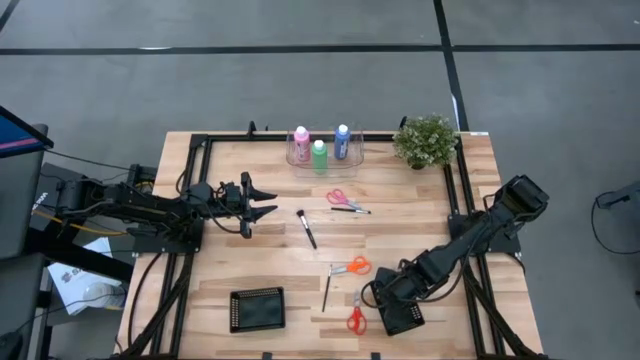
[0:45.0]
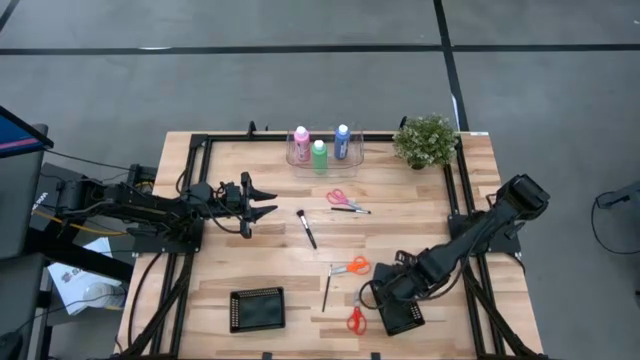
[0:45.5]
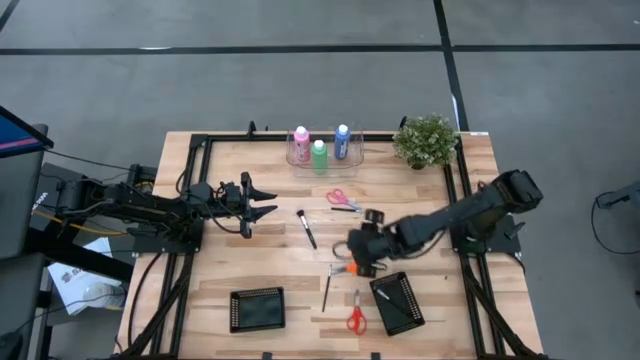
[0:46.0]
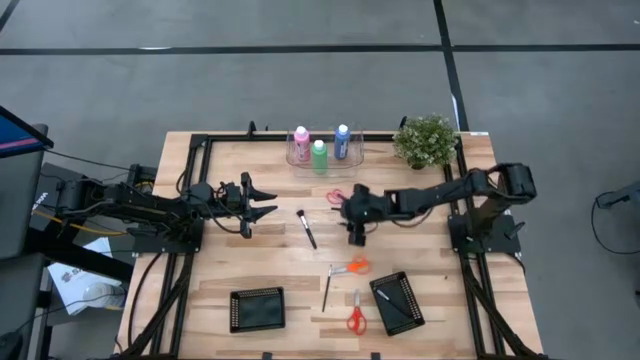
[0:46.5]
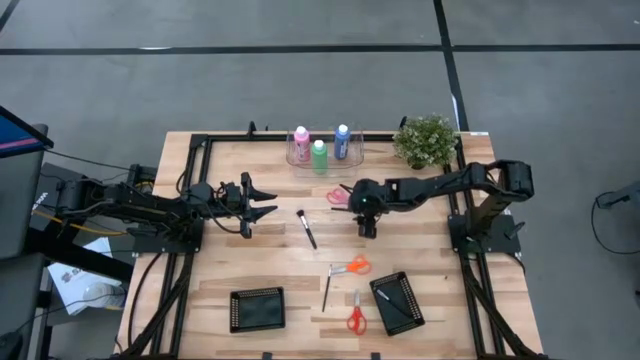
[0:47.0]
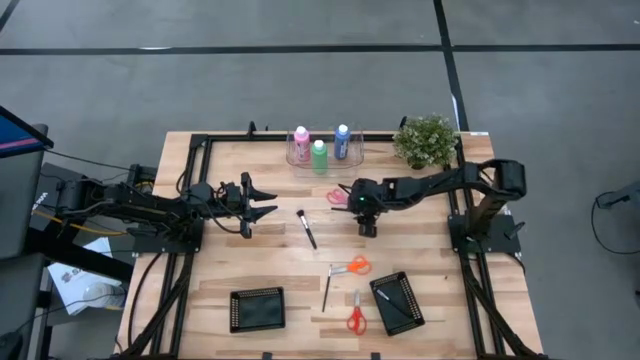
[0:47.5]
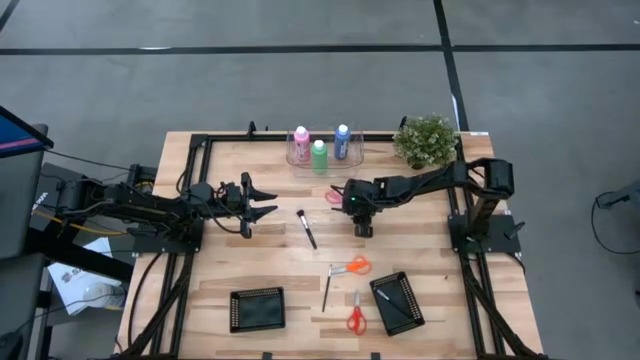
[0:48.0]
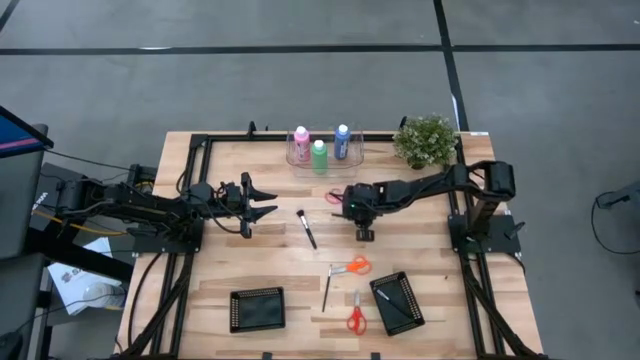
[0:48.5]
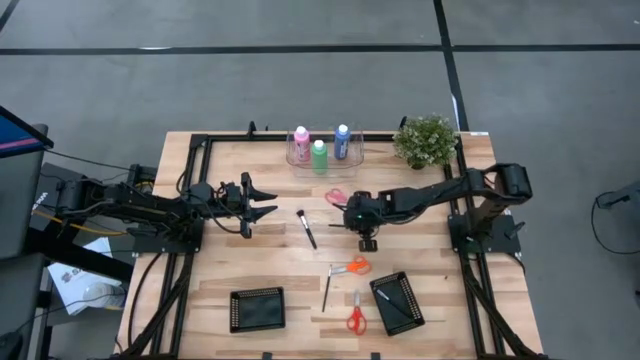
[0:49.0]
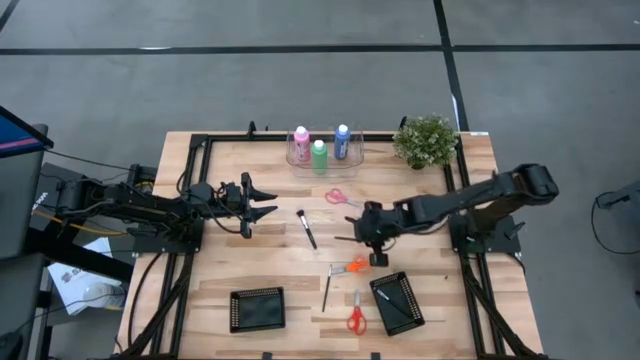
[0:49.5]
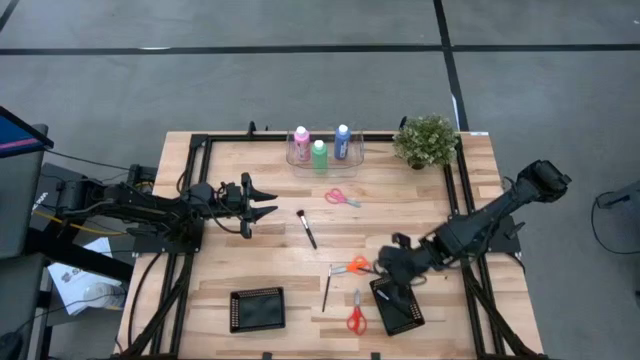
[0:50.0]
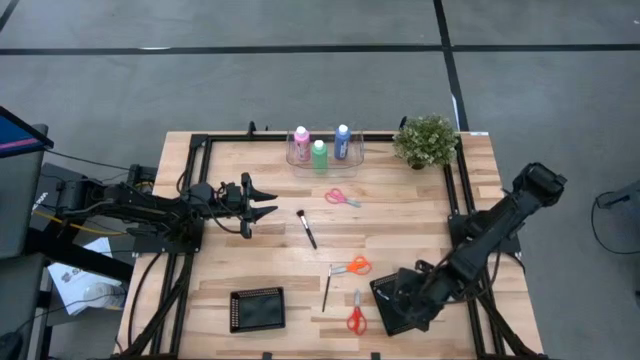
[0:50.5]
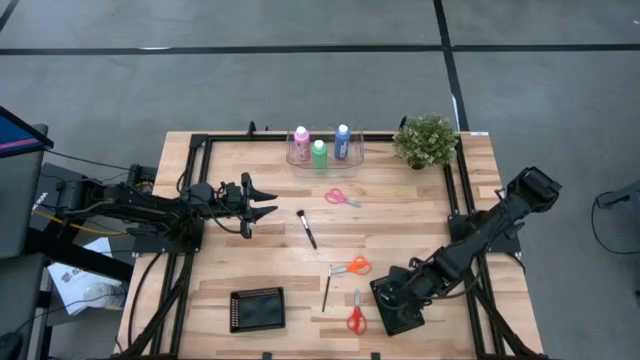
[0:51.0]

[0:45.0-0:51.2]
Task: Pick & Place Paint Supplies
Put the black paint brush into the right black bin

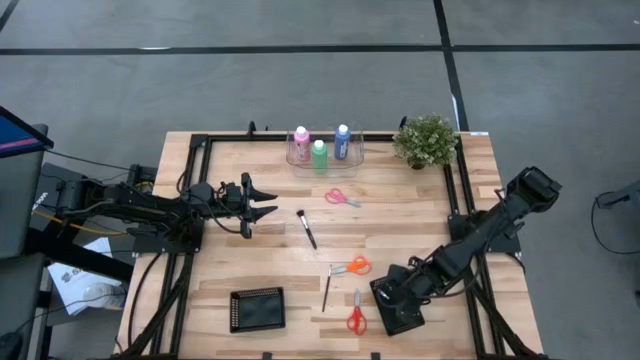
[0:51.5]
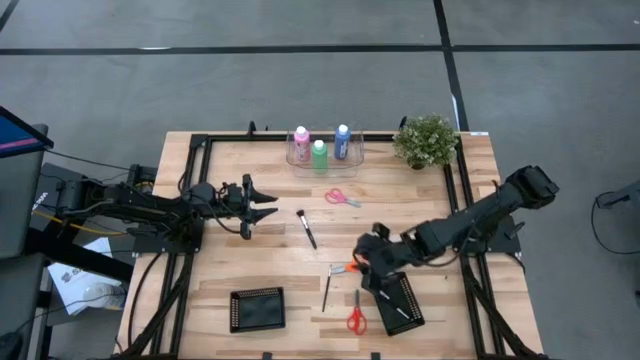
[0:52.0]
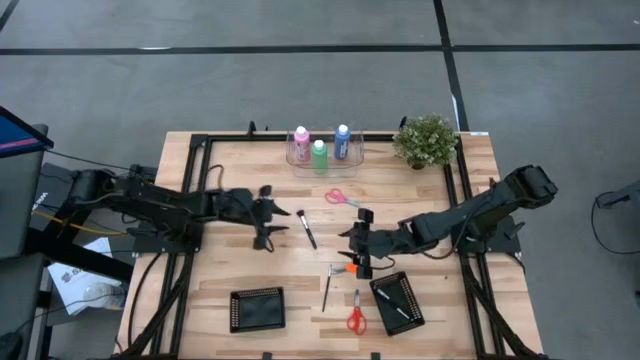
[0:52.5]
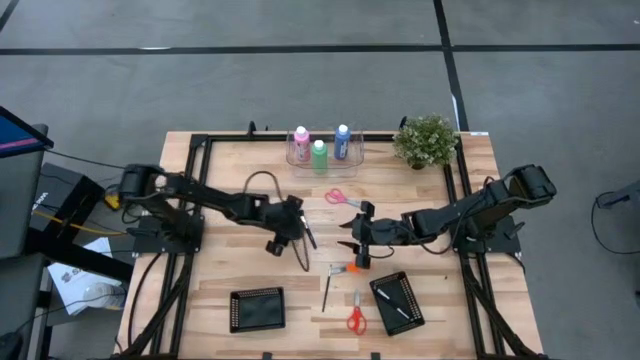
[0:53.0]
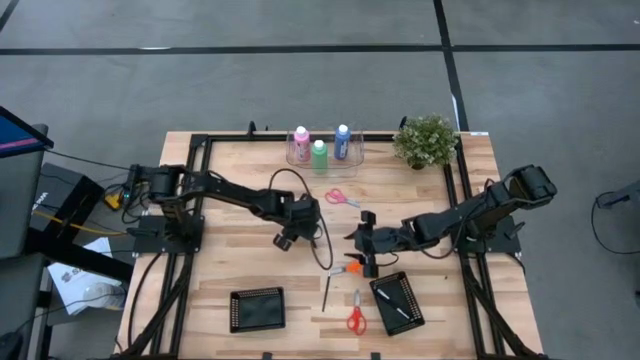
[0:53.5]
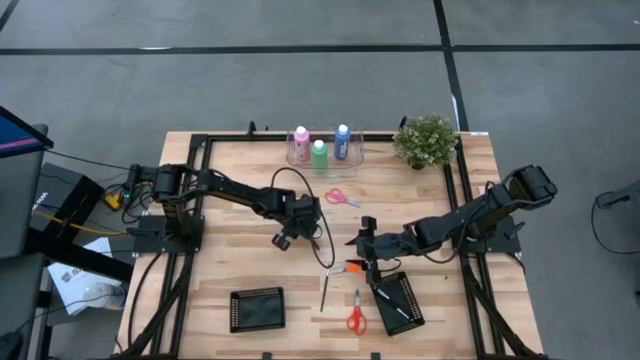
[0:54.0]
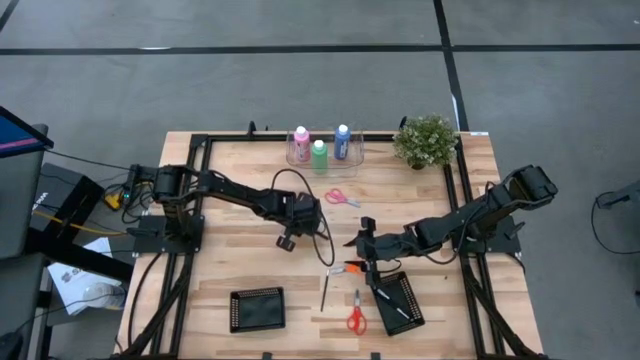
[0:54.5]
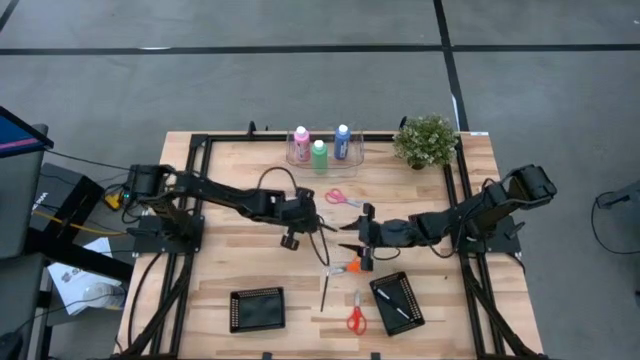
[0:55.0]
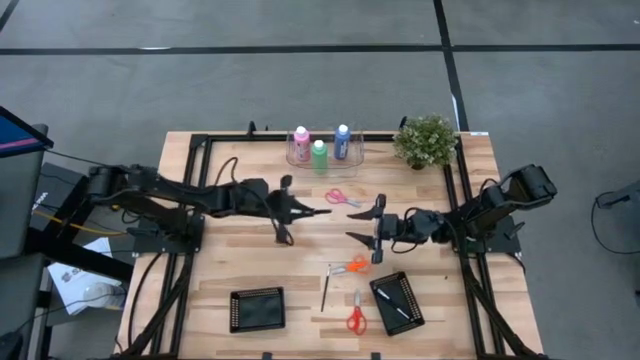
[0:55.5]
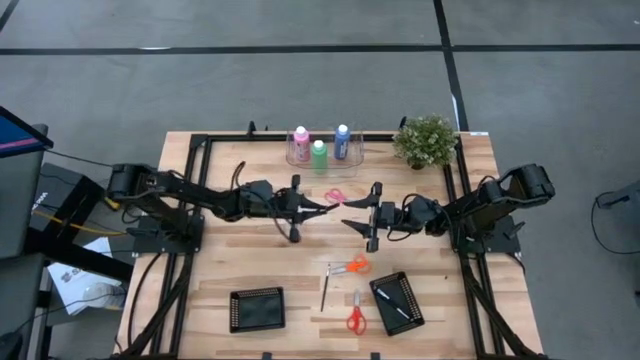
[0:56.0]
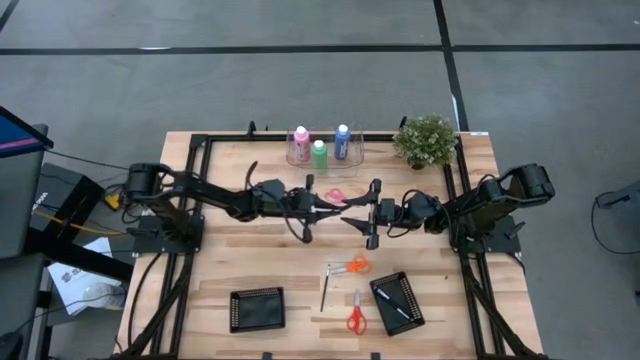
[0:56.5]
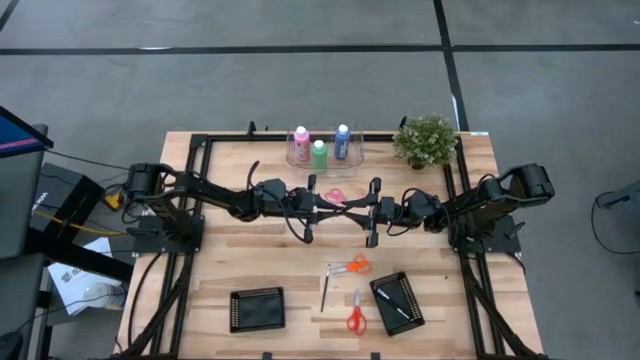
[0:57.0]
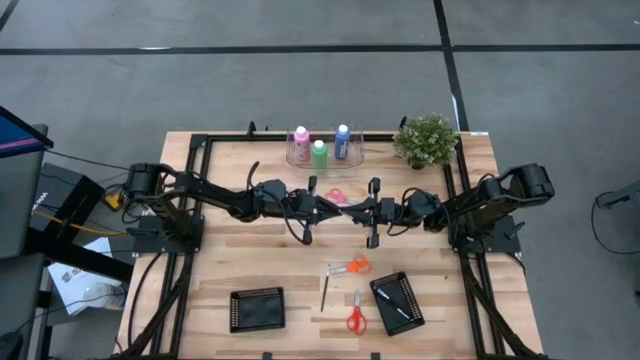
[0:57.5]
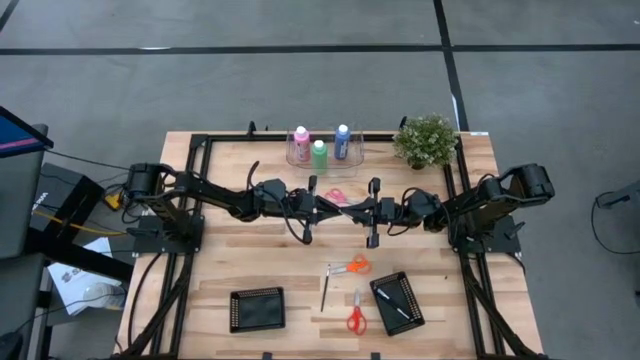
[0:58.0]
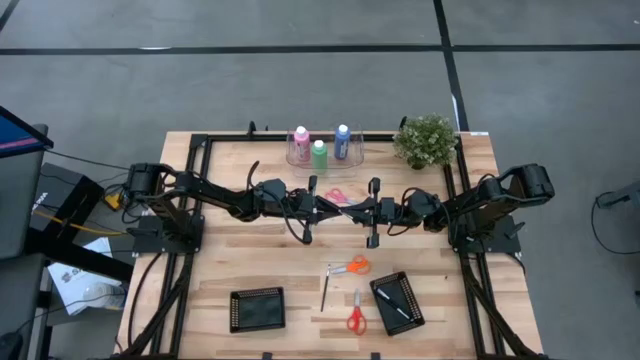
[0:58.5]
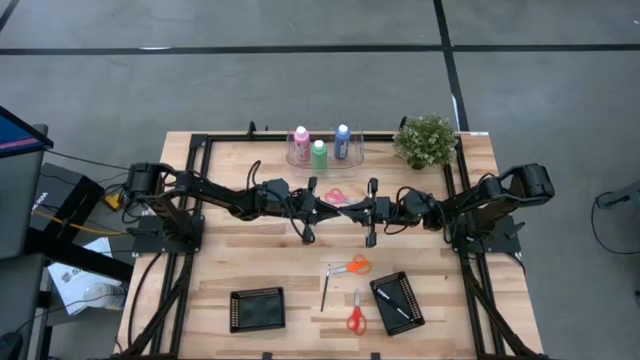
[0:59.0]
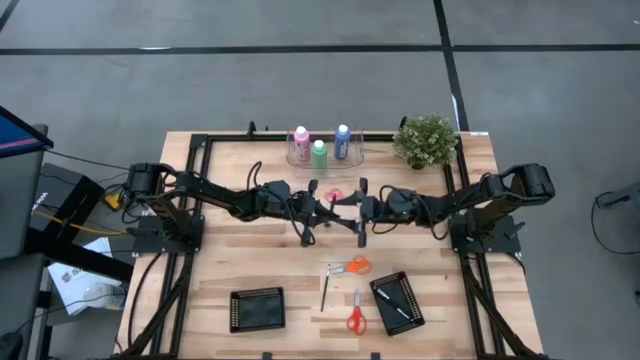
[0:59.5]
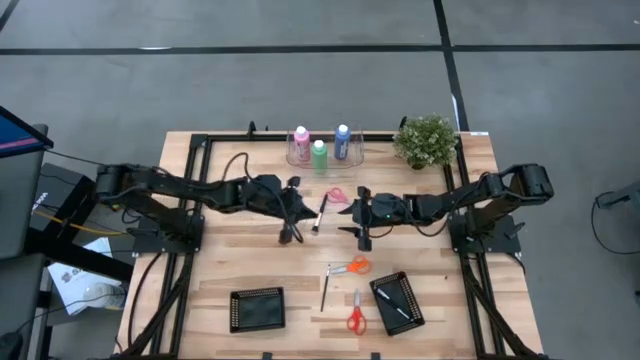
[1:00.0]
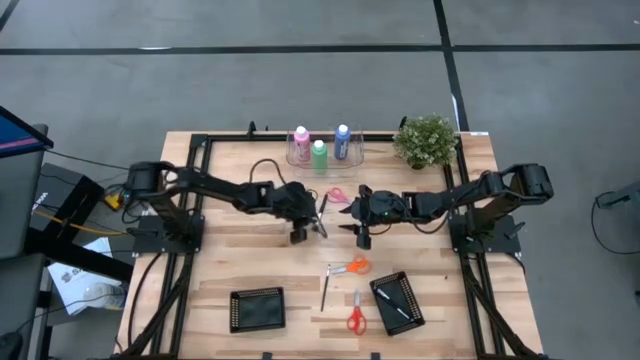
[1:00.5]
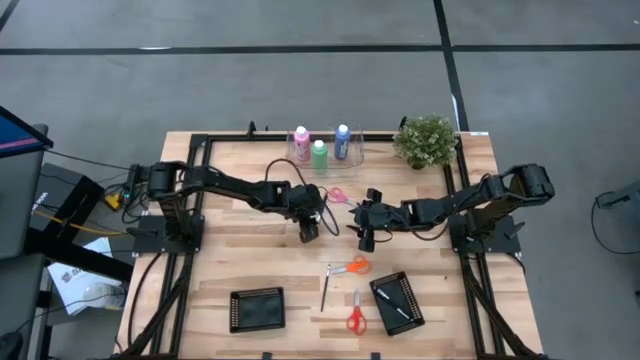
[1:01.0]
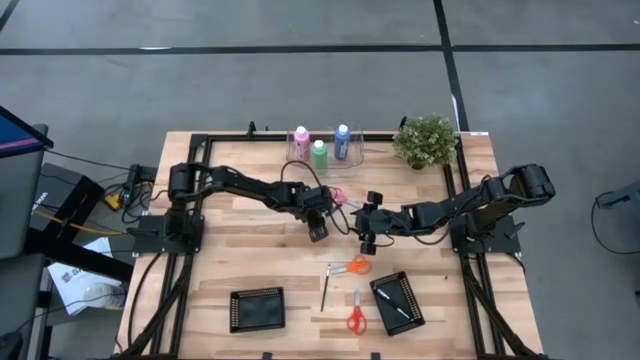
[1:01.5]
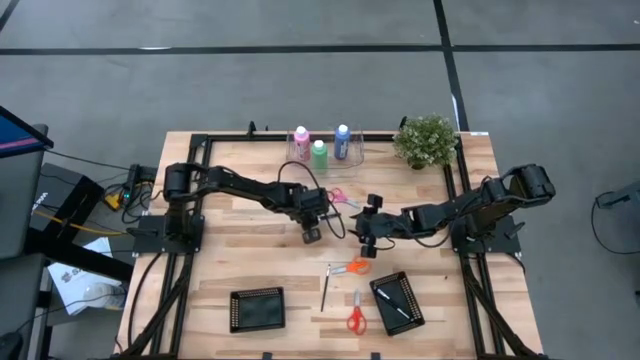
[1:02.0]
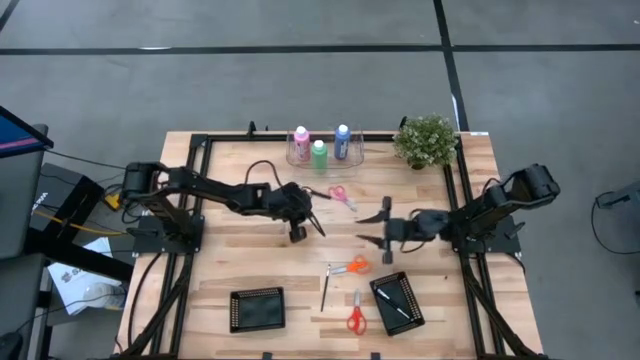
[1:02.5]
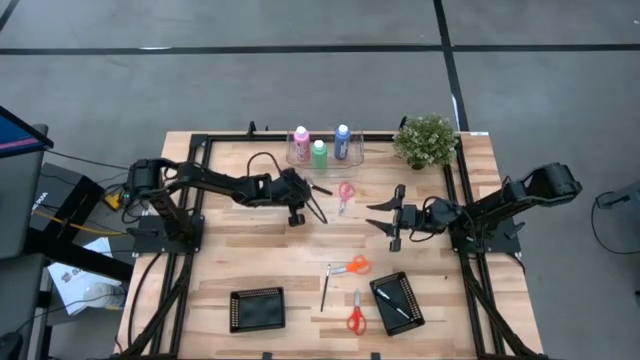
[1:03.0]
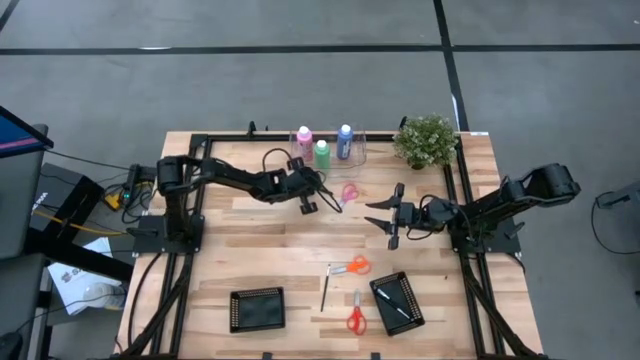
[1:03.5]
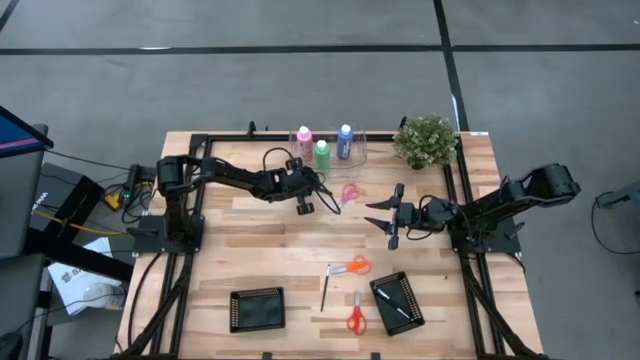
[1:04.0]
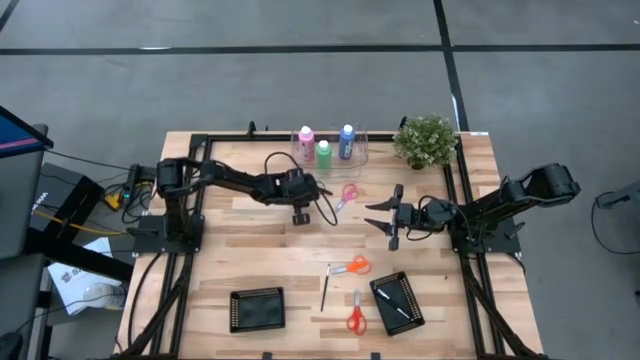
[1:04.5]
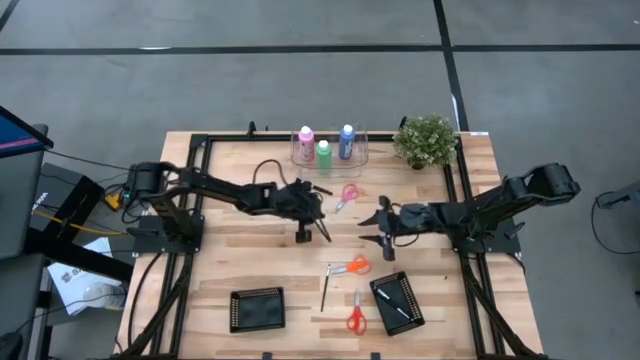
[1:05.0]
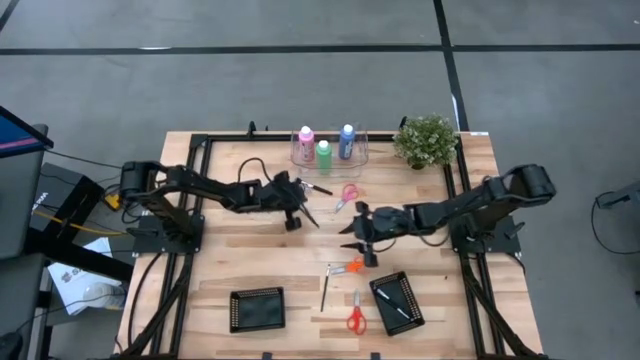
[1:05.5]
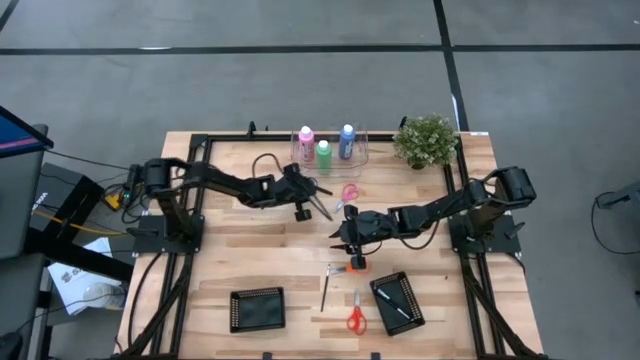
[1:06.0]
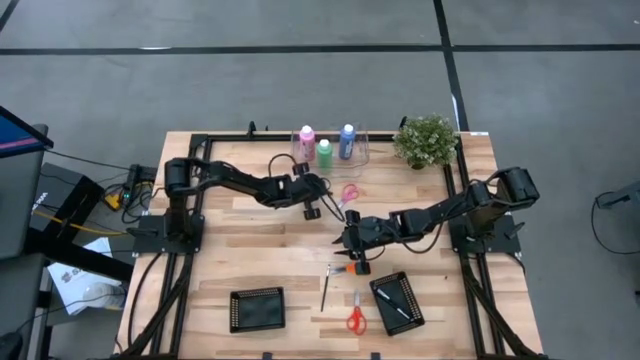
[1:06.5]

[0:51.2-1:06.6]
Put the black paint brush into the right black bin
